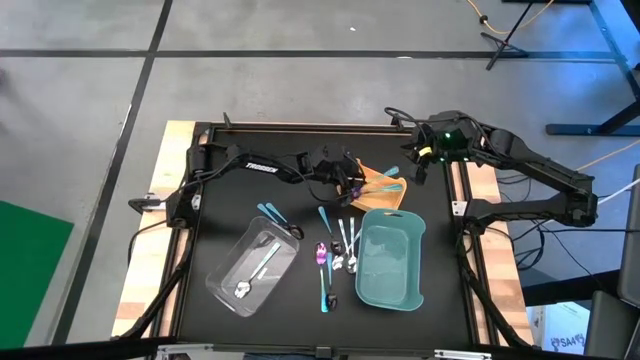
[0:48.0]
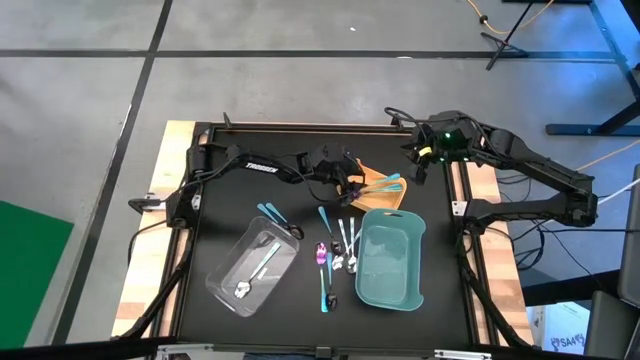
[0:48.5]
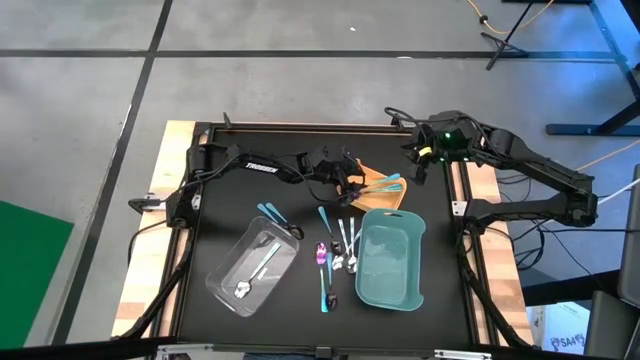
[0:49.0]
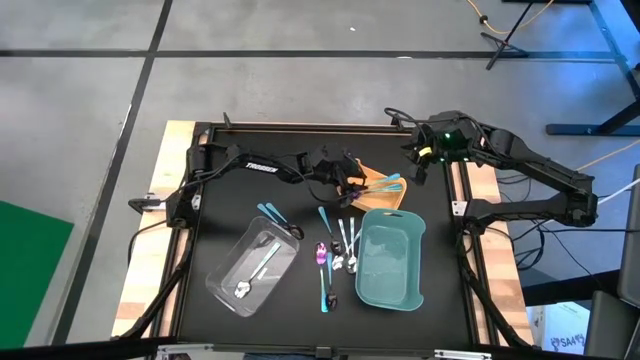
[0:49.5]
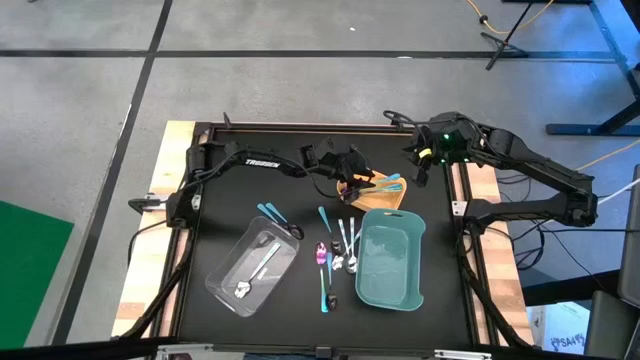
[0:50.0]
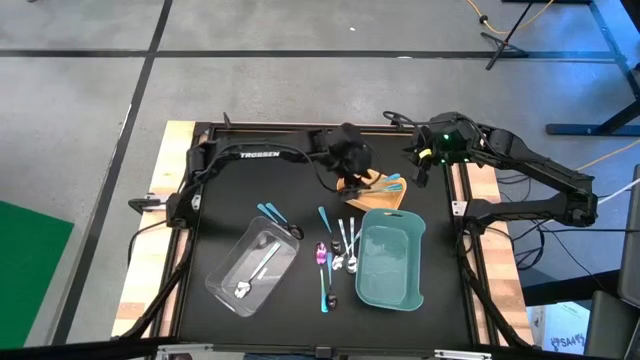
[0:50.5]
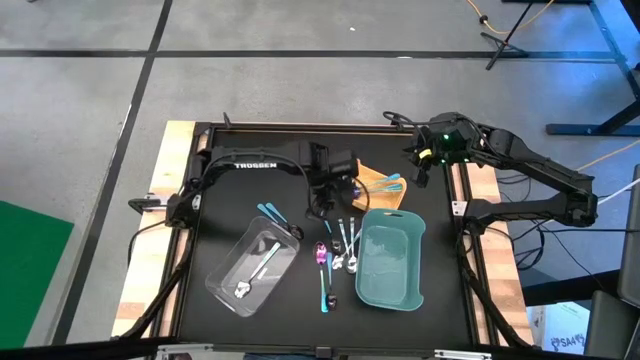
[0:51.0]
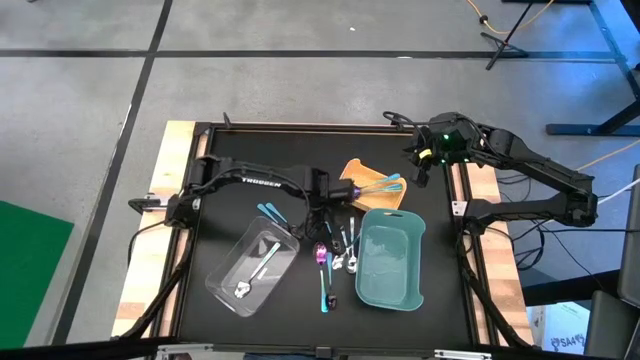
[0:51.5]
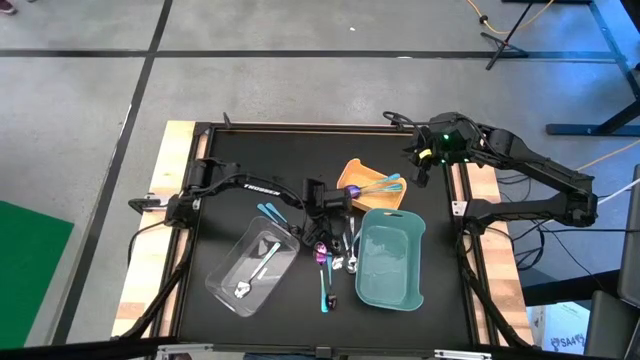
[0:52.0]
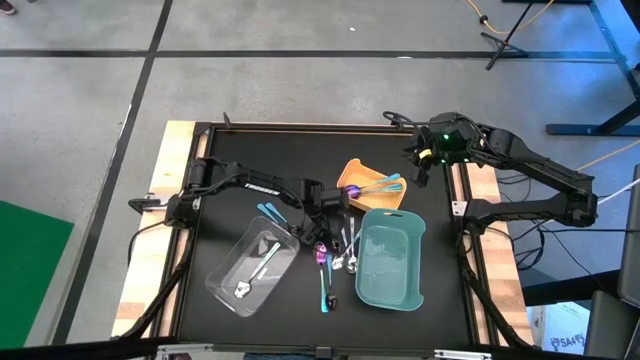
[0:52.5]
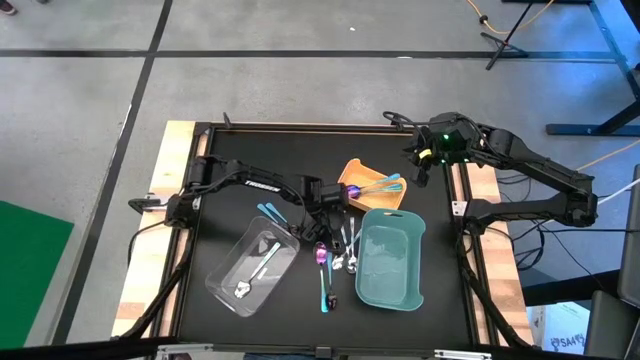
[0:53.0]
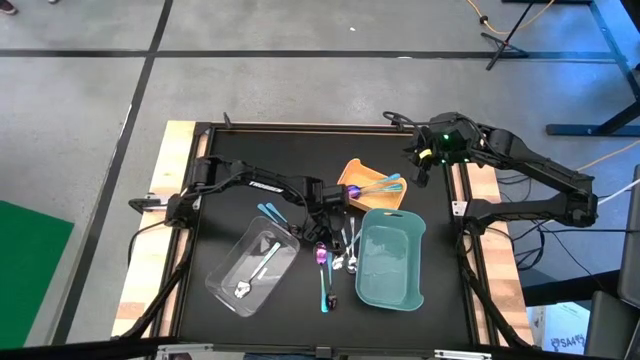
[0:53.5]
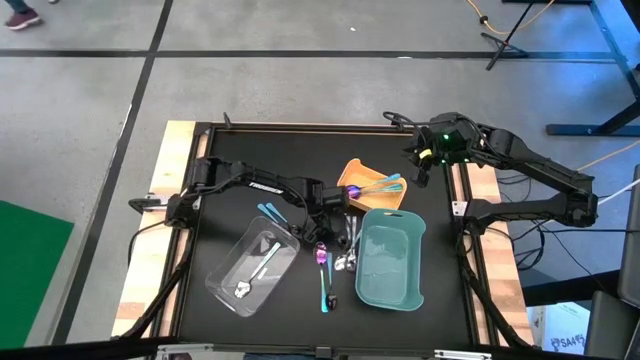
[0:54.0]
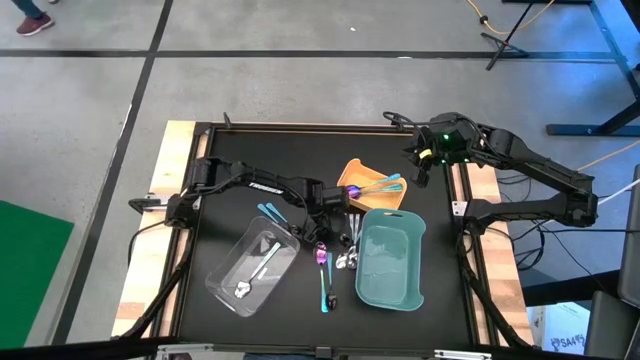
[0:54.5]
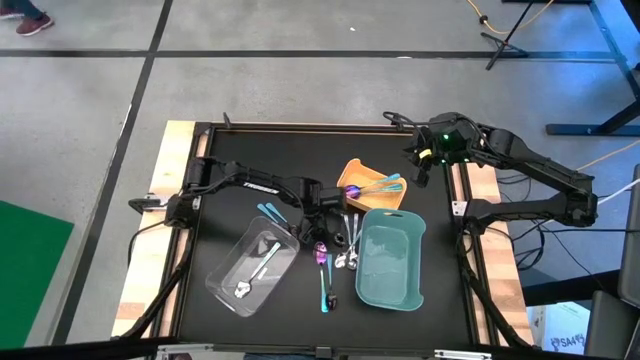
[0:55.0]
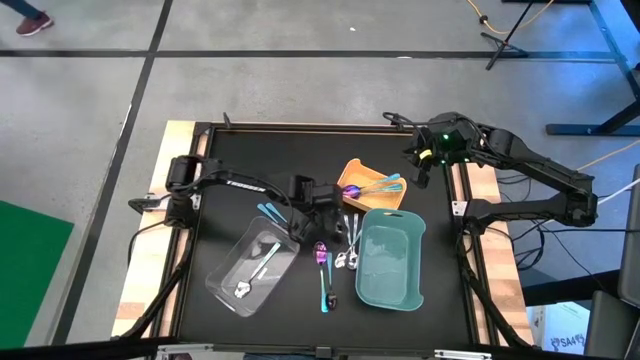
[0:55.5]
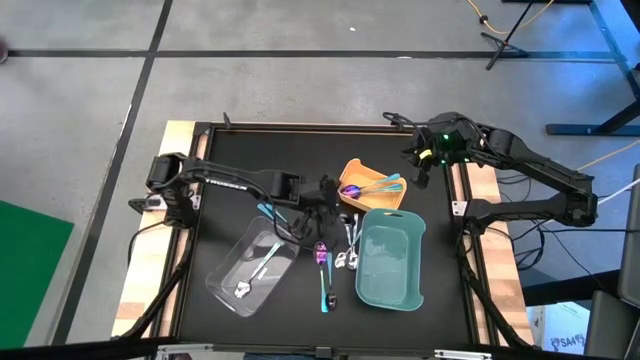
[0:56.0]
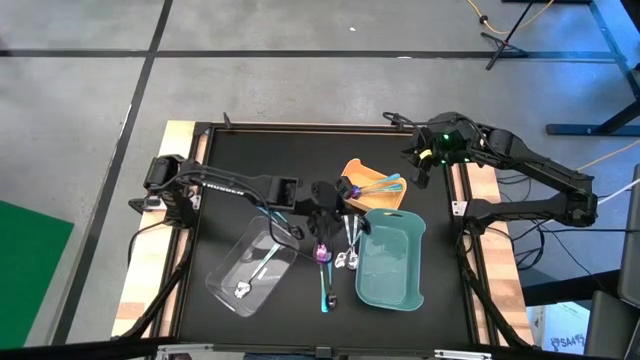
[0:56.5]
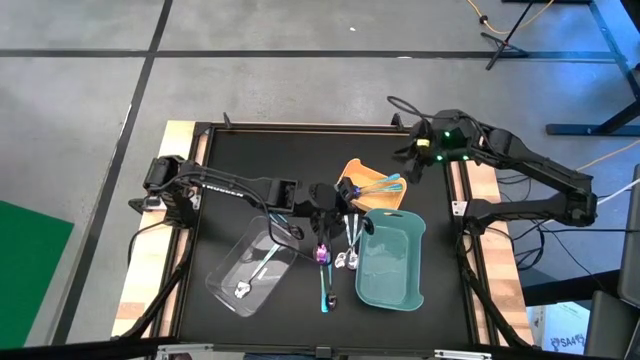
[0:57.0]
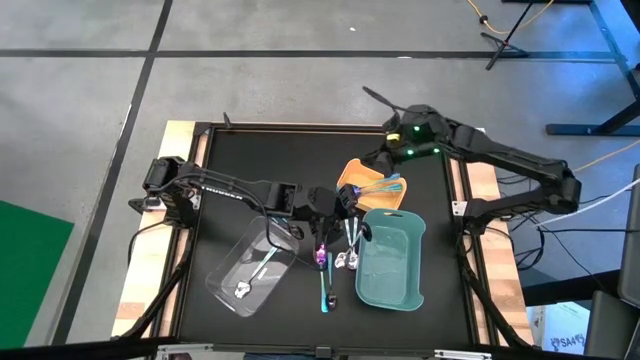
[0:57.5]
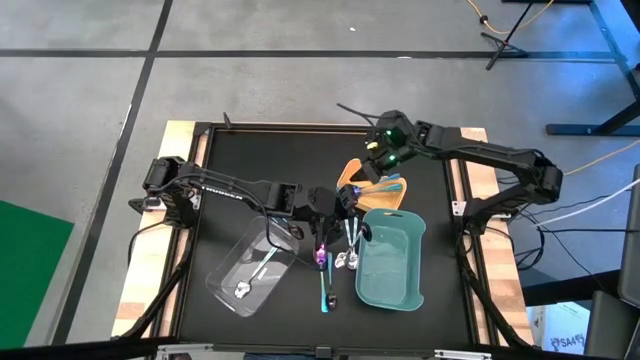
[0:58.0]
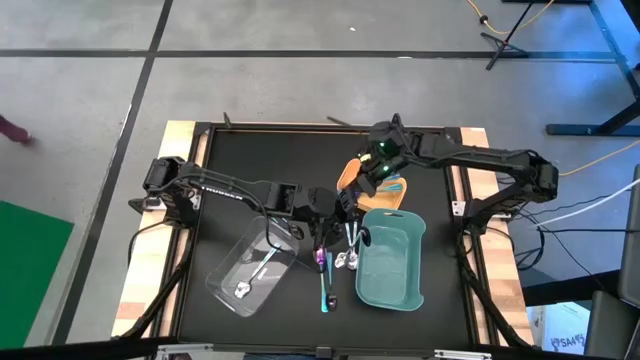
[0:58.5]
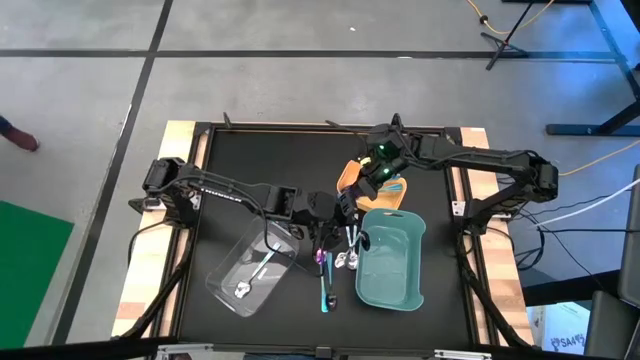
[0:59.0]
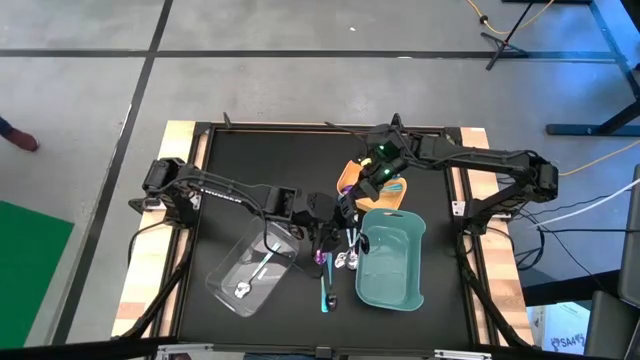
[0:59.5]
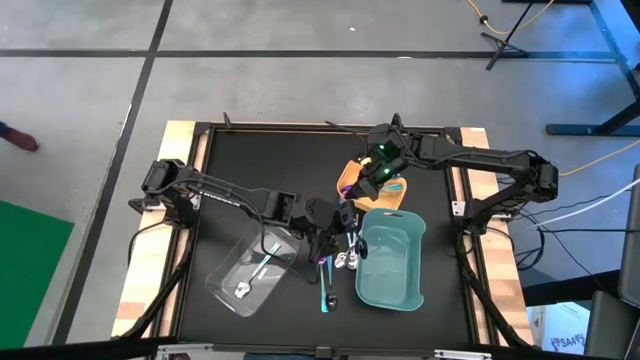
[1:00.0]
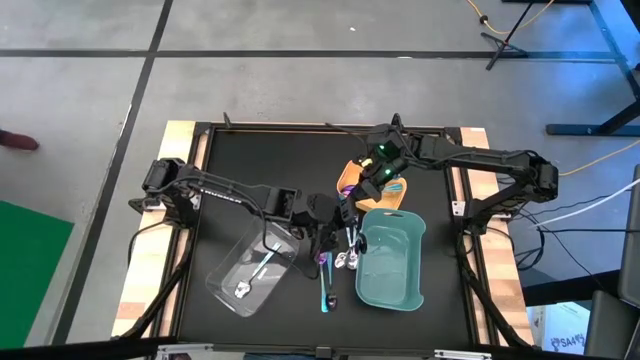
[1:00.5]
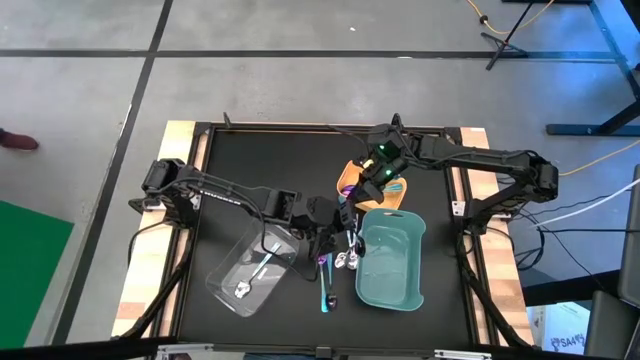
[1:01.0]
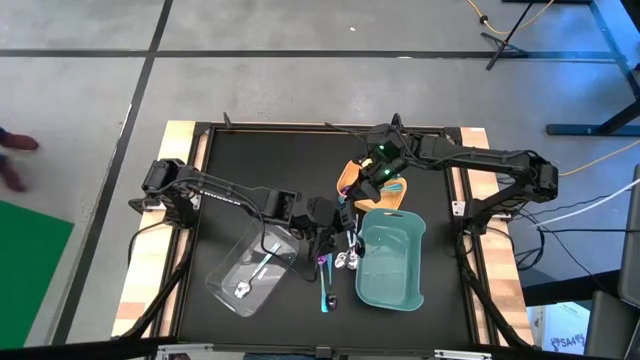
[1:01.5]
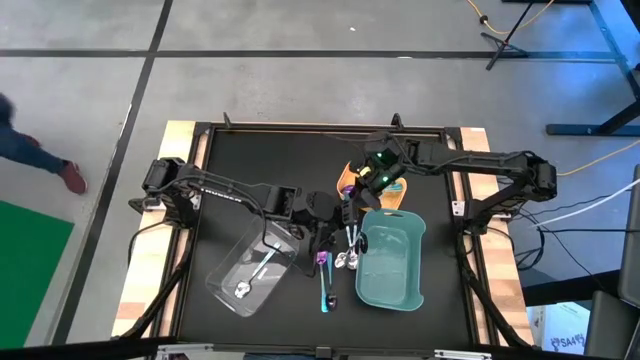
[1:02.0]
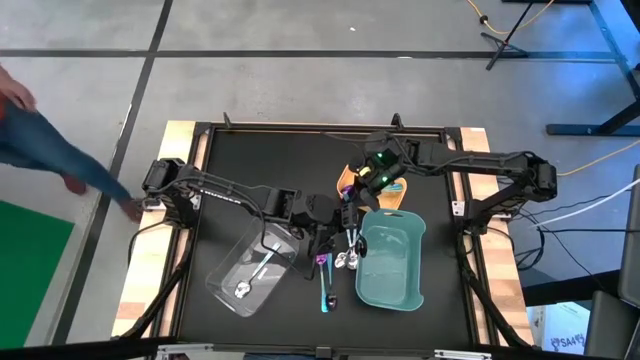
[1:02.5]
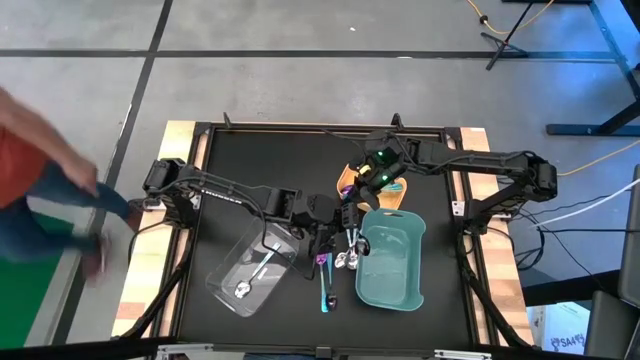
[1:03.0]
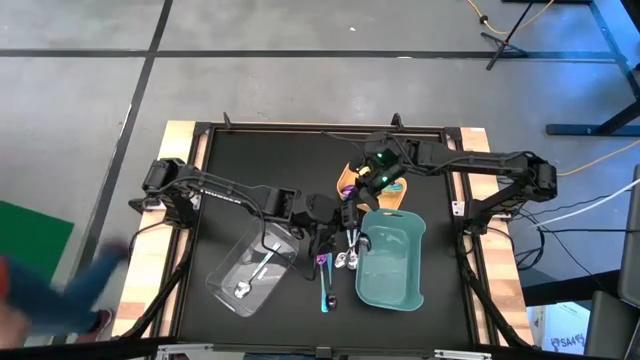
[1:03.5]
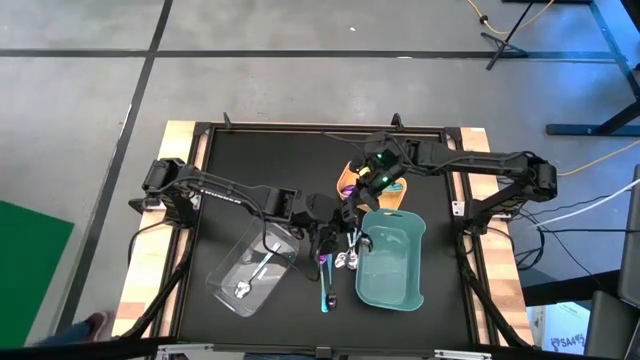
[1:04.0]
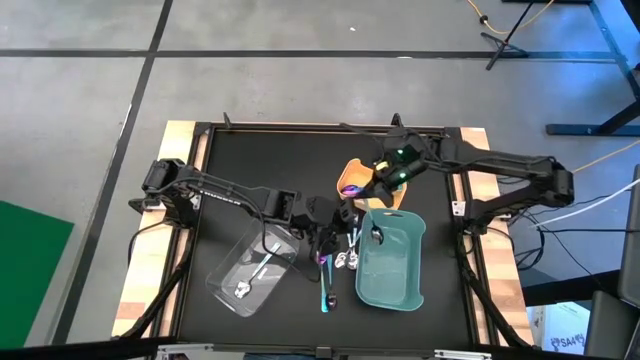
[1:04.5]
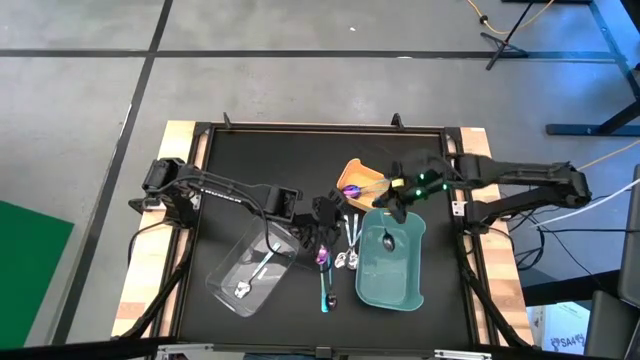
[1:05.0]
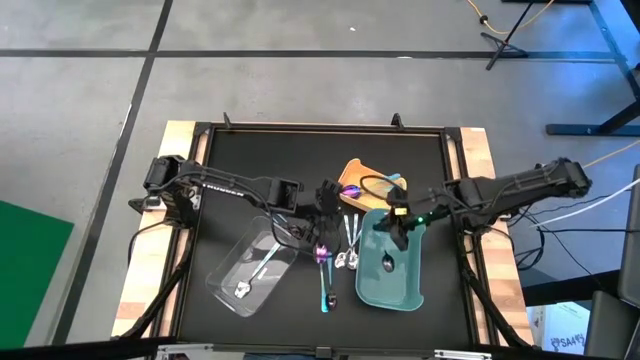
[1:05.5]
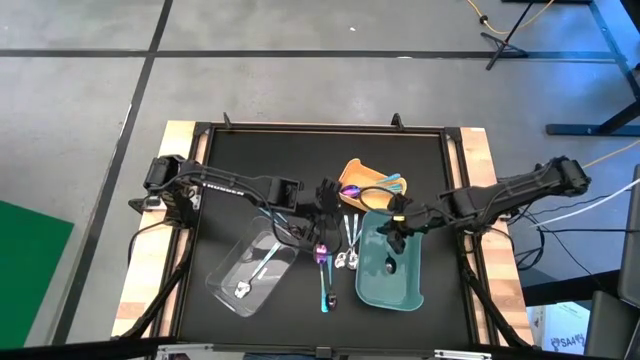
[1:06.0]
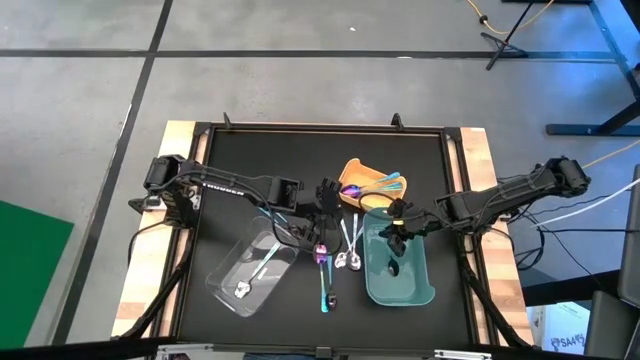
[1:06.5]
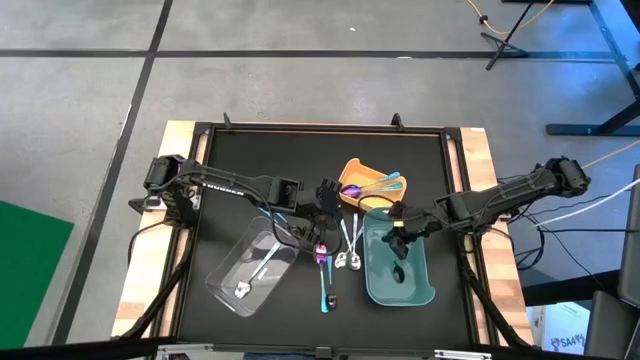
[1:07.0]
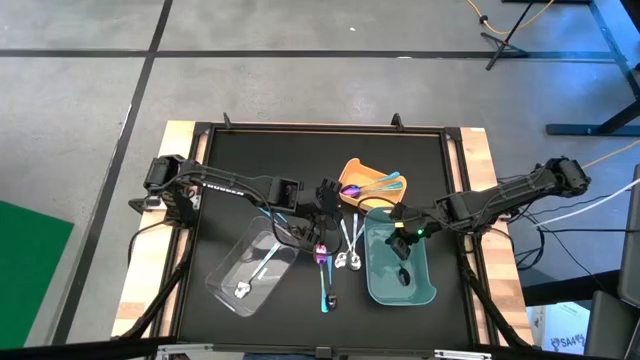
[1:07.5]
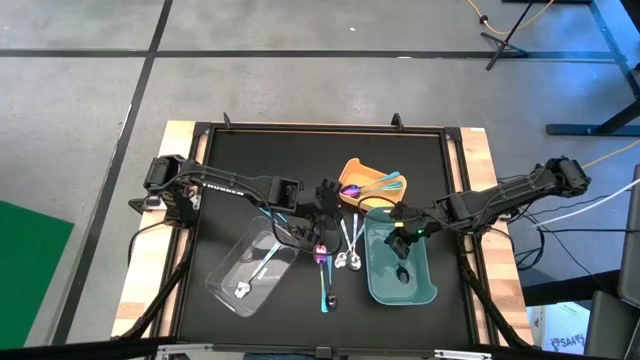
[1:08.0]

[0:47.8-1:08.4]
Task: Sort silverware by color (type)
Put the blue spoon into the blue bin

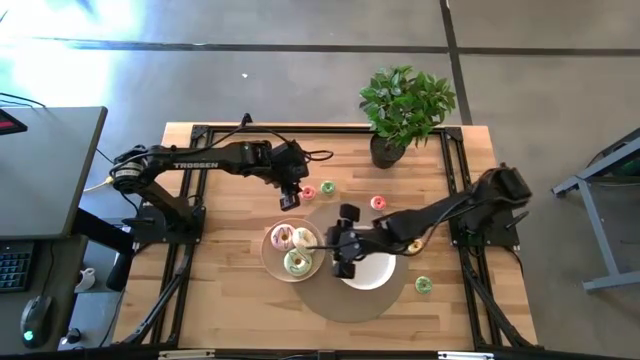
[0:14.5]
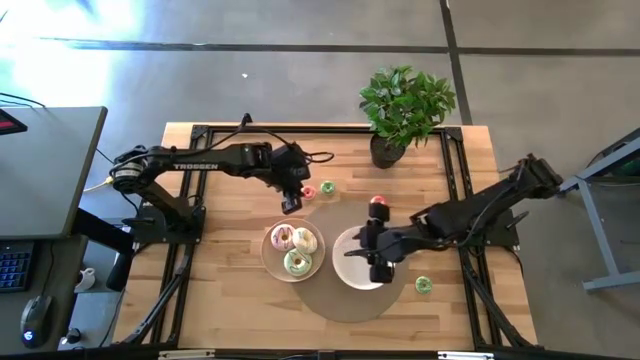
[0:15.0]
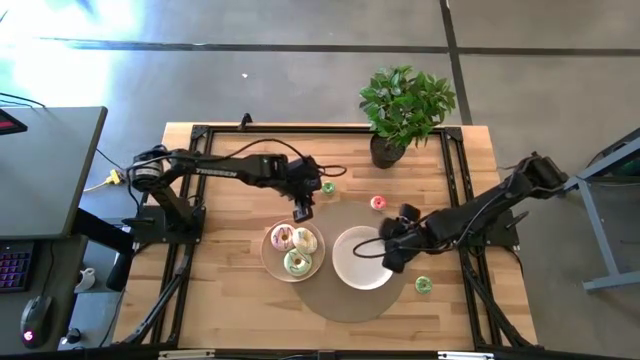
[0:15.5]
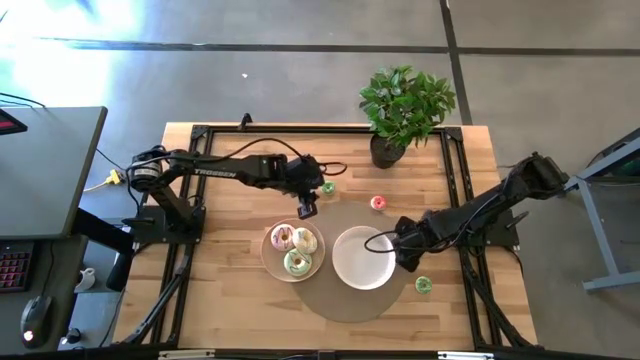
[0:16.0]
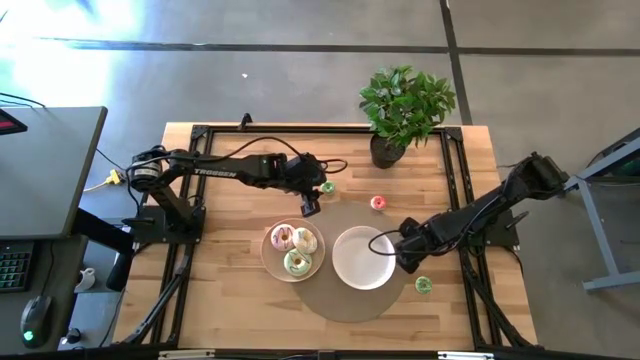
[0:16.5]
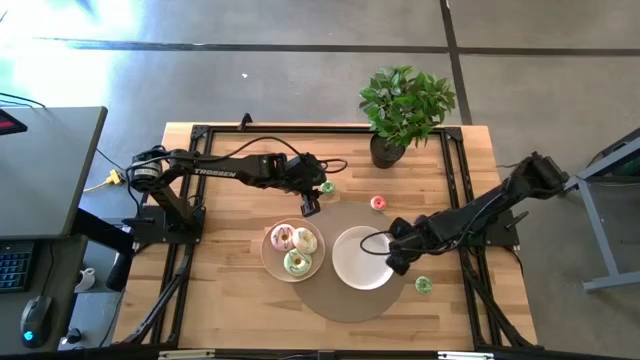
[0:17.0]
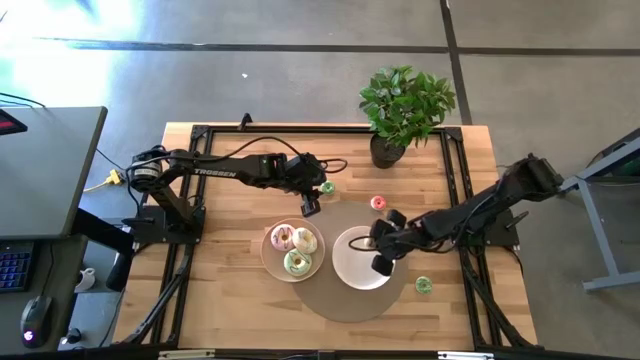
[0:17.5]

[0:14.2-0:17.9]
Task: Pick & Place donuts
Put the small yellow donut on the white plate
